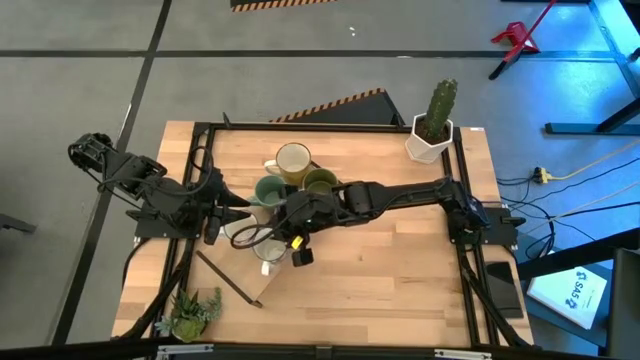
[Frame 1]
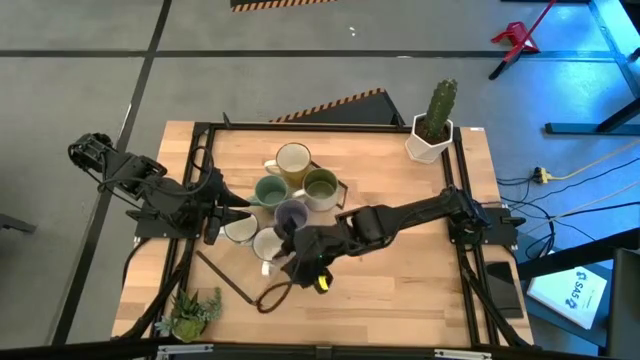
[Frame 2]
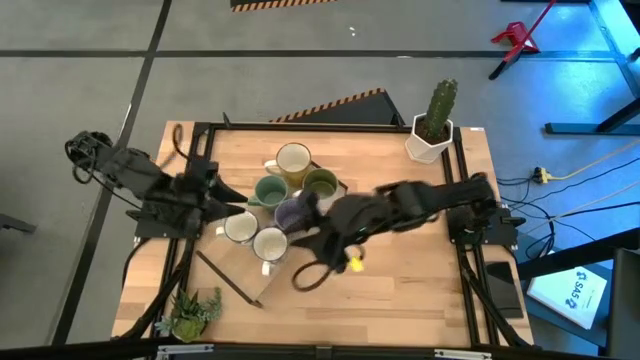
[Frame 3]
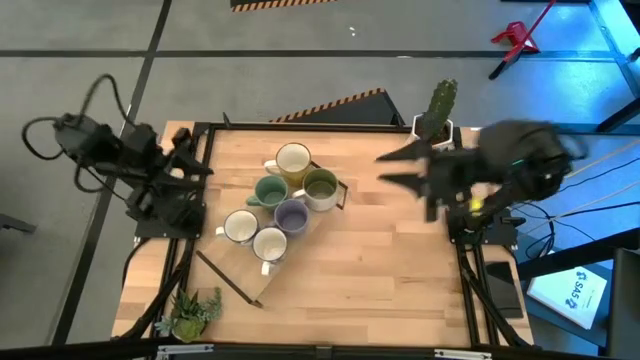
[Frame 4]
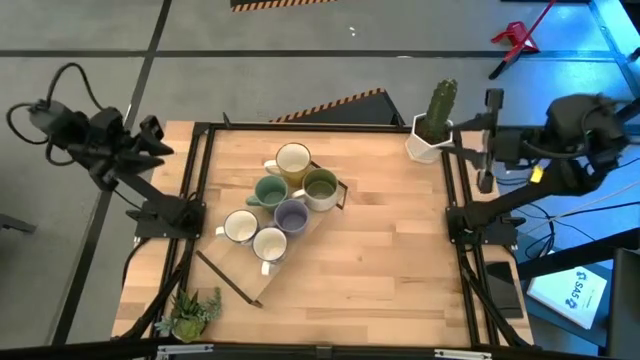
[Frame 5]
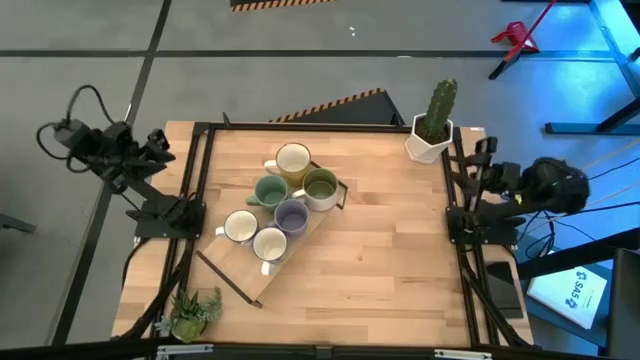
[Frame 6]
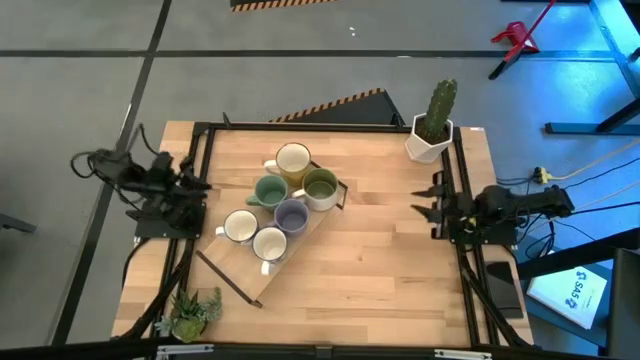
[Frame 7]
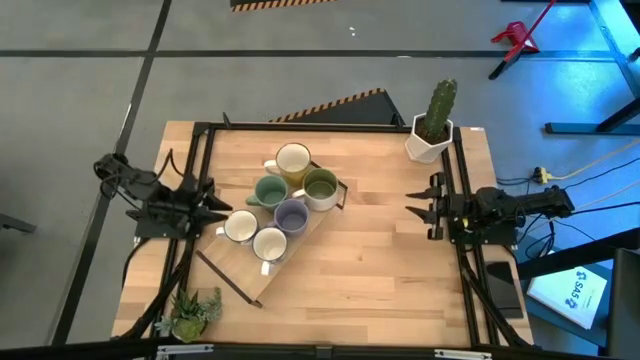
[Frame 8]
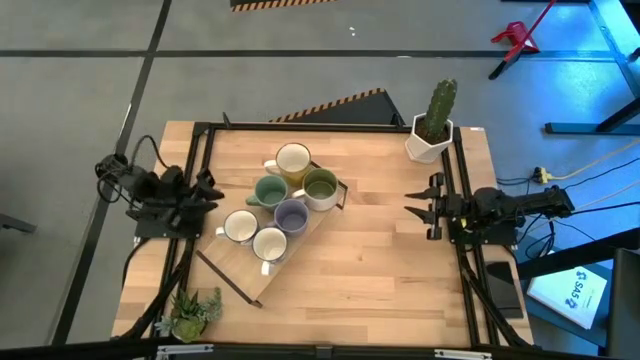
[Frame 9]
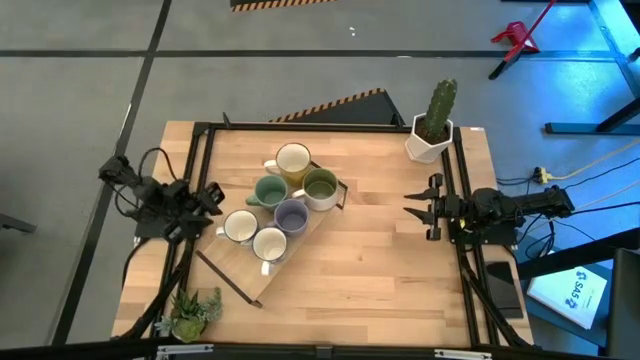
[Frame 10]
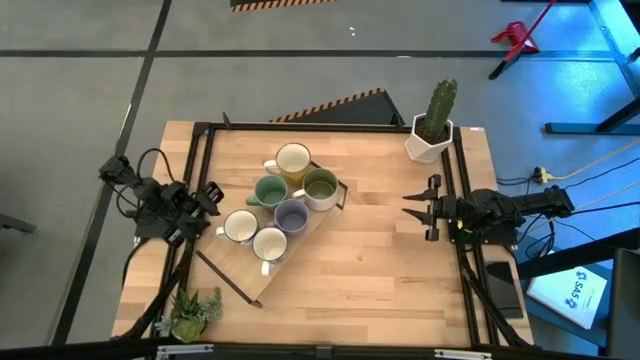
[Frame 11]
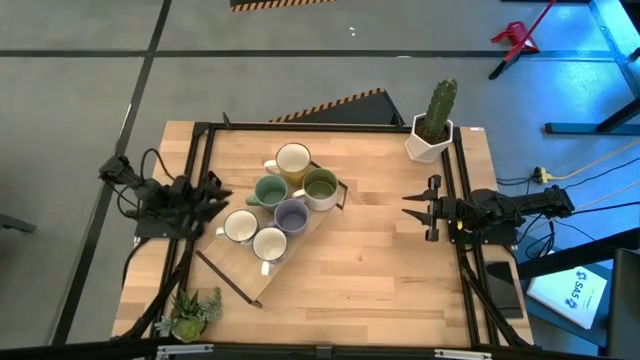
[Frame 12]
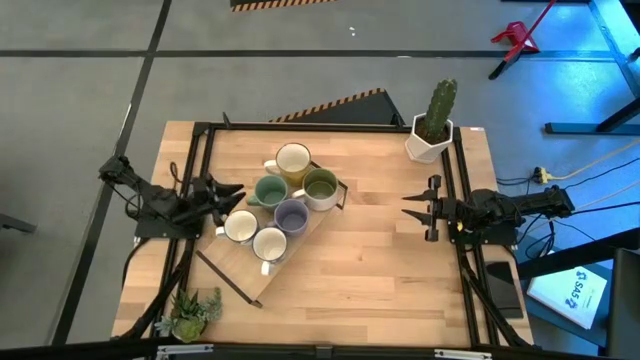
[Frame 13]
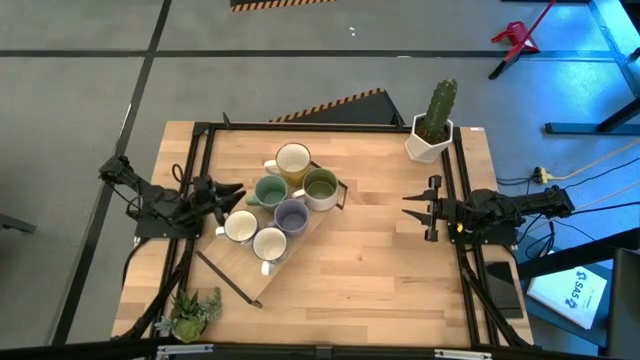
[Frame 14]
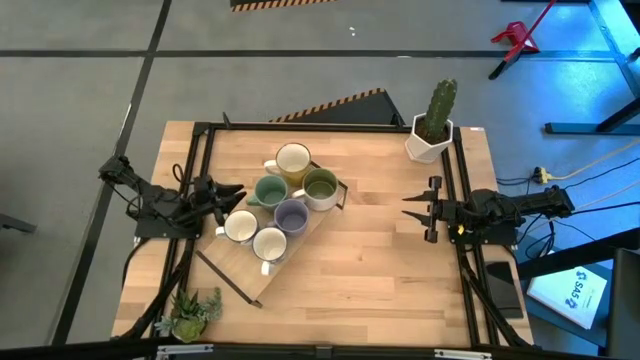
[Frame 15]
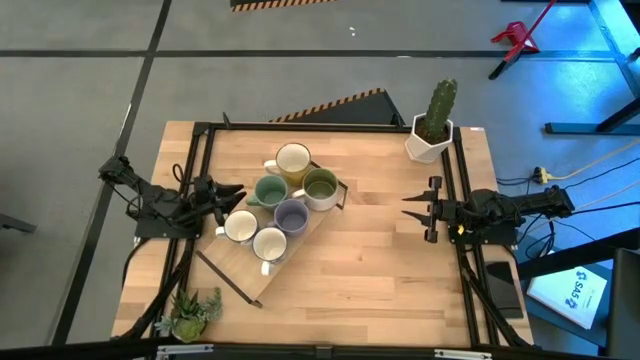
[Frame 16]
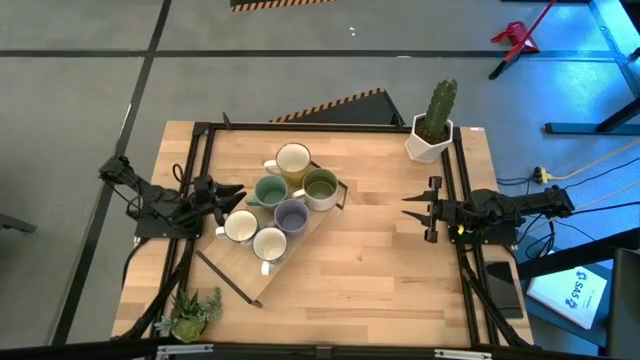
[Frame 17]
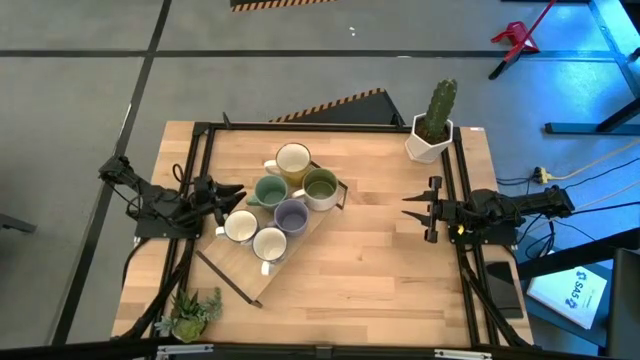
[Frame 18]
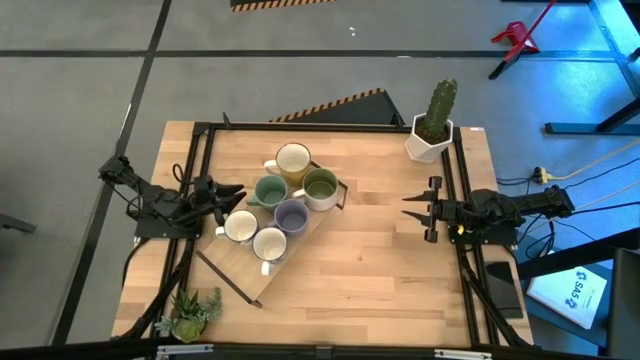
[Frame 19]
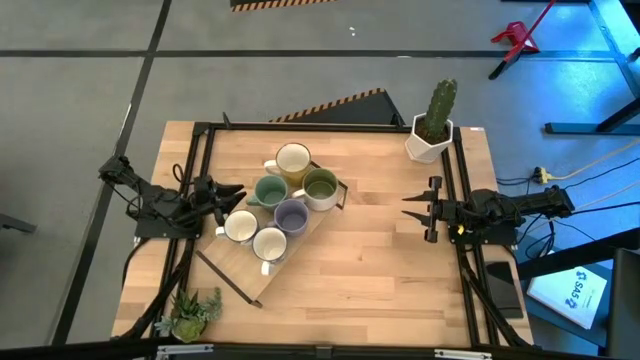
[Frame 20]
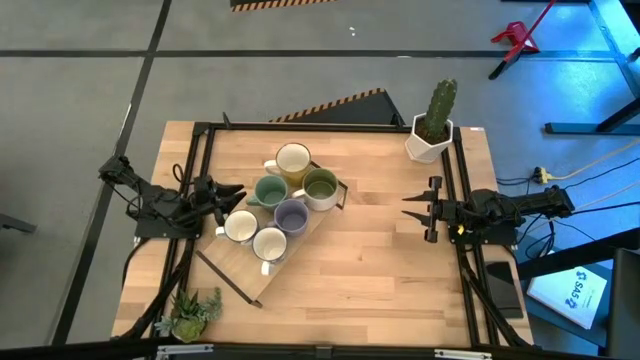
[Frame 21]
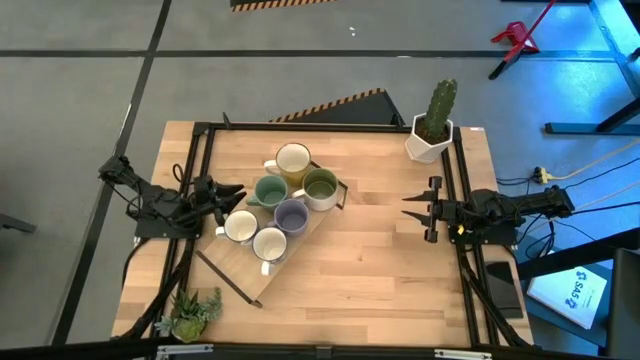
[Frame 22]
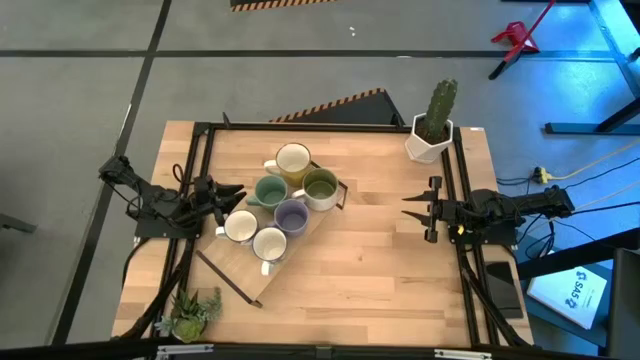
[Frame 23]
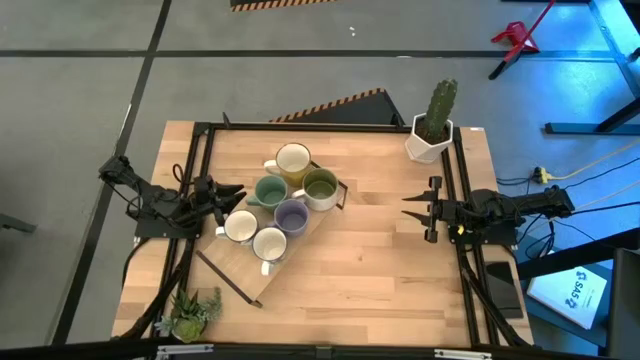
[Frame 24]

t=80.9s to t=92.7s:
Task: Place coffee mugs
Return to Home Position

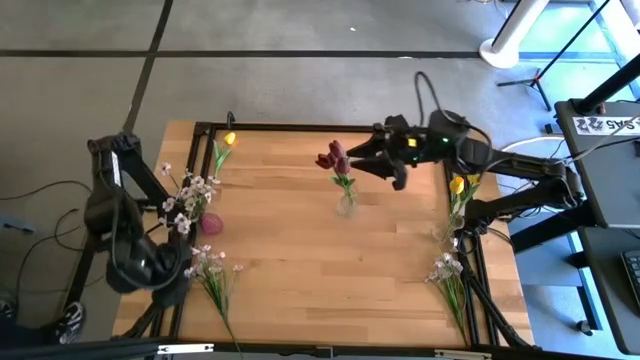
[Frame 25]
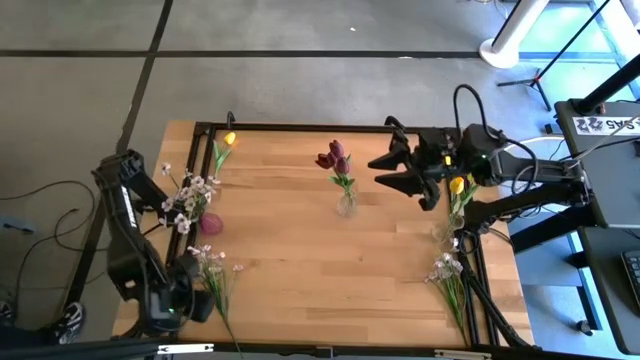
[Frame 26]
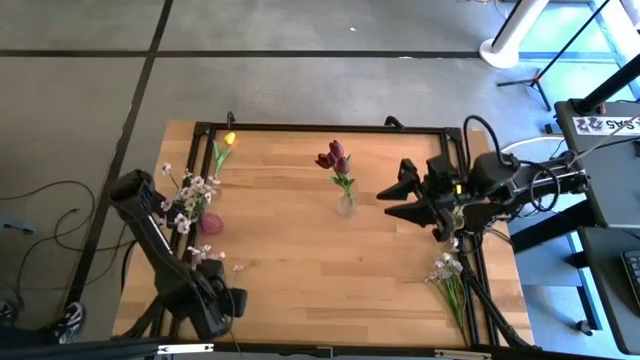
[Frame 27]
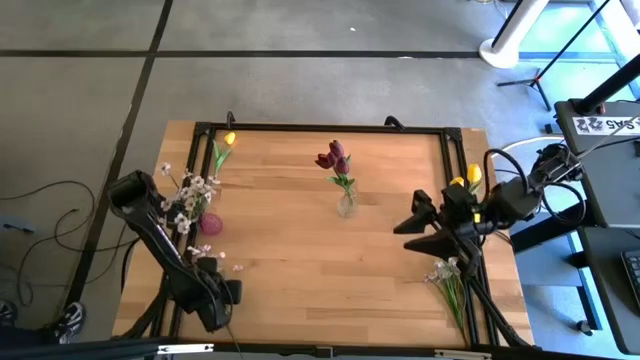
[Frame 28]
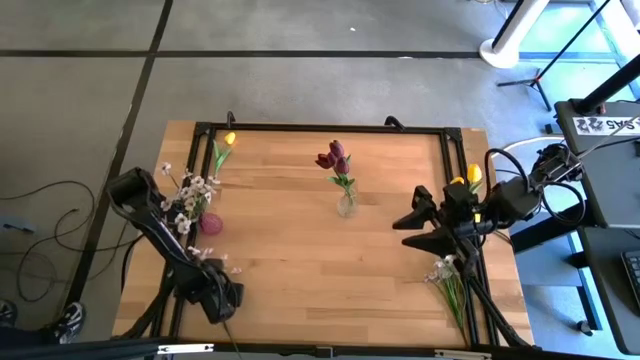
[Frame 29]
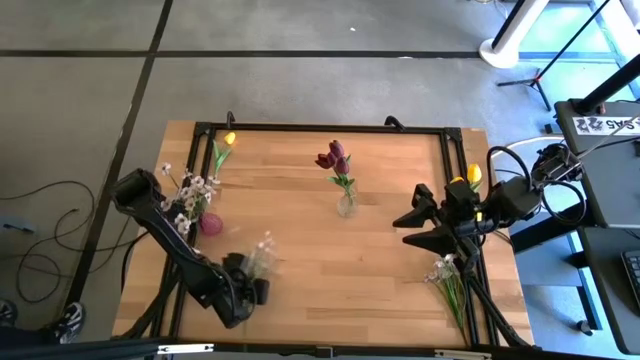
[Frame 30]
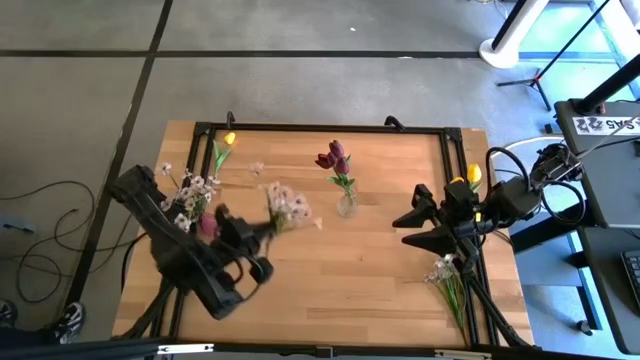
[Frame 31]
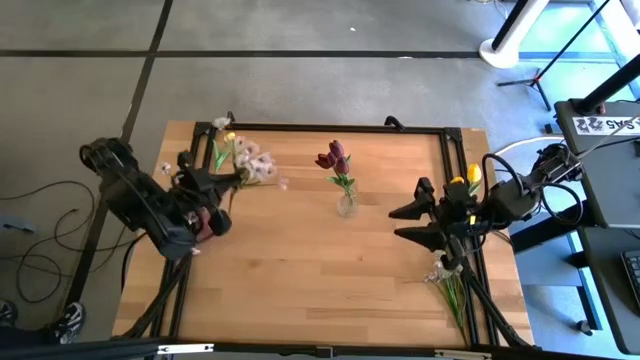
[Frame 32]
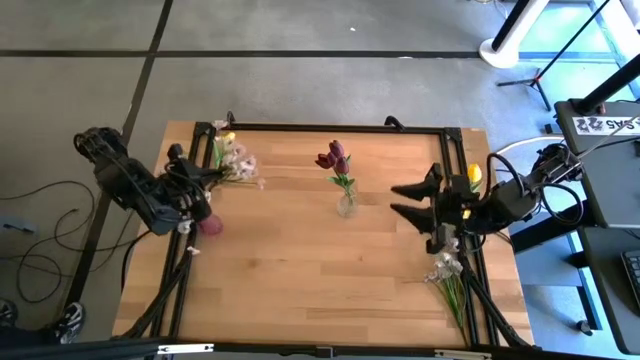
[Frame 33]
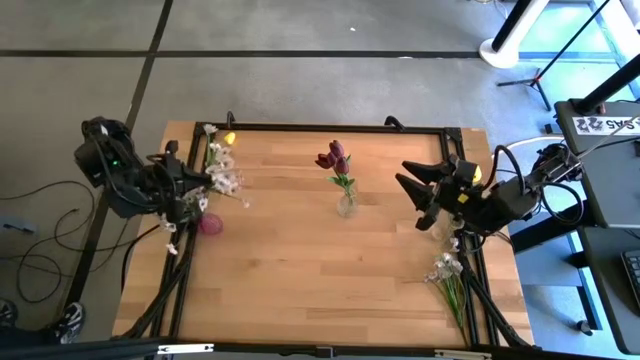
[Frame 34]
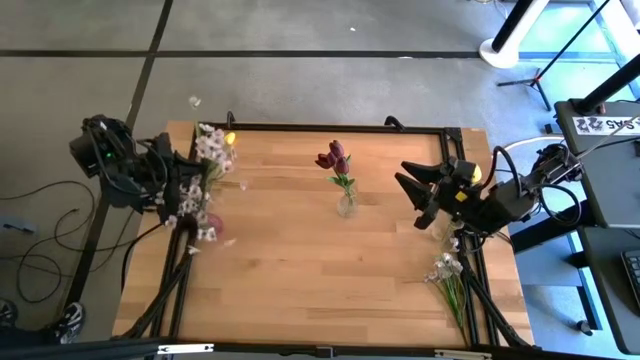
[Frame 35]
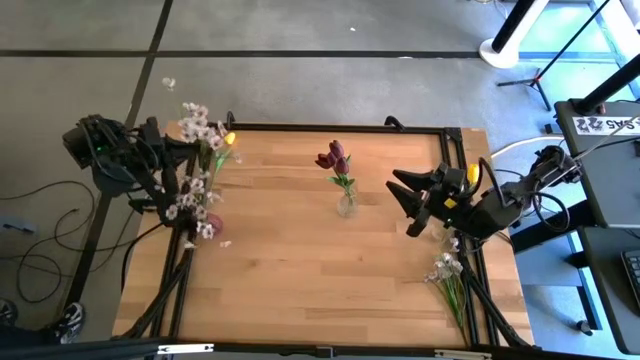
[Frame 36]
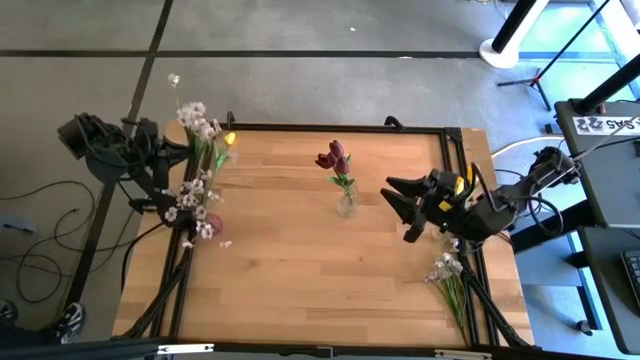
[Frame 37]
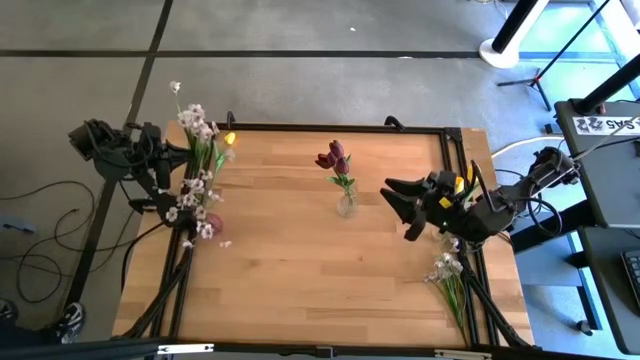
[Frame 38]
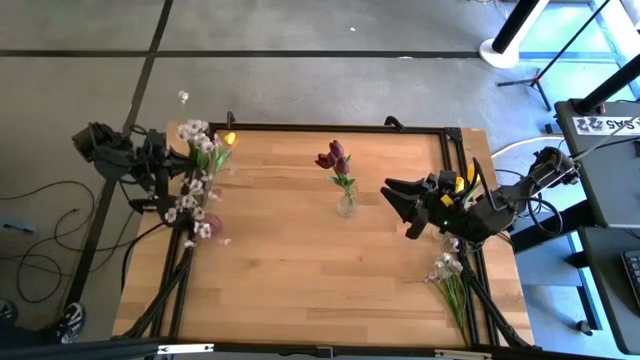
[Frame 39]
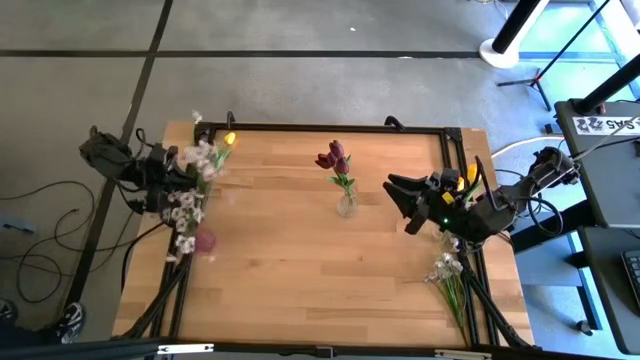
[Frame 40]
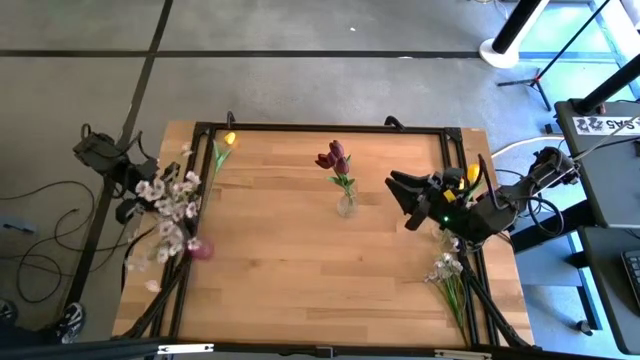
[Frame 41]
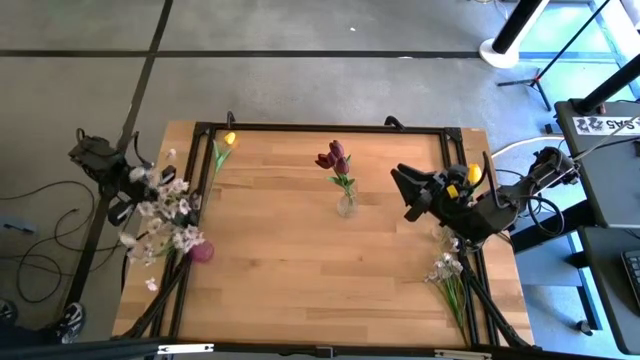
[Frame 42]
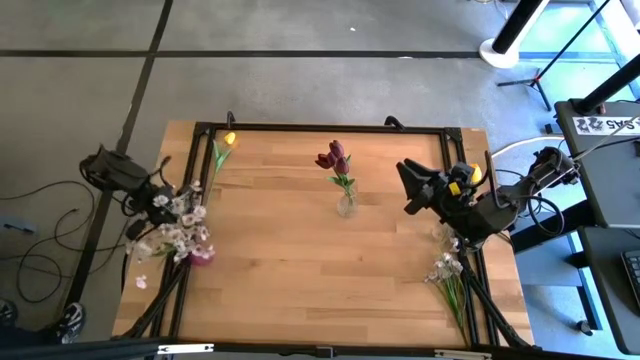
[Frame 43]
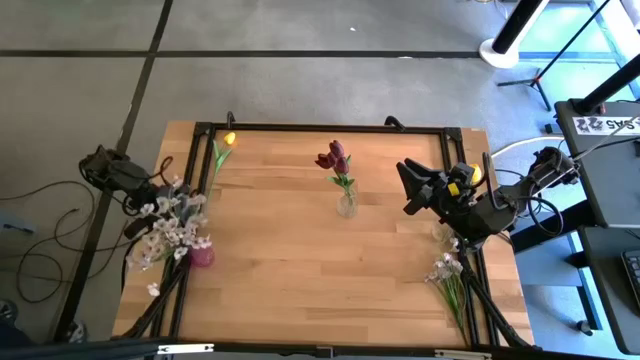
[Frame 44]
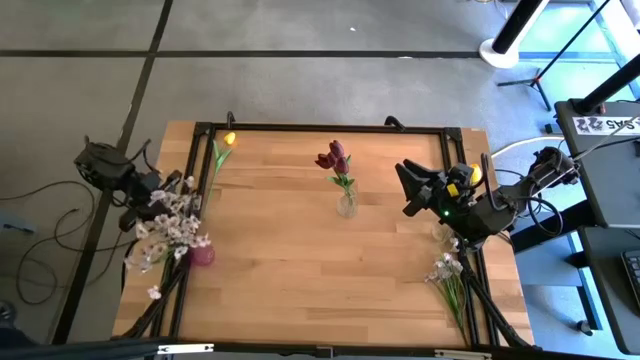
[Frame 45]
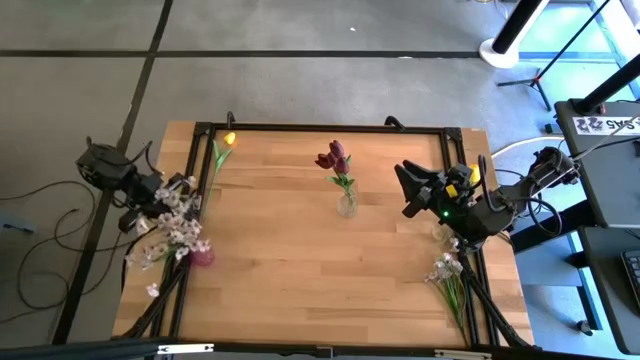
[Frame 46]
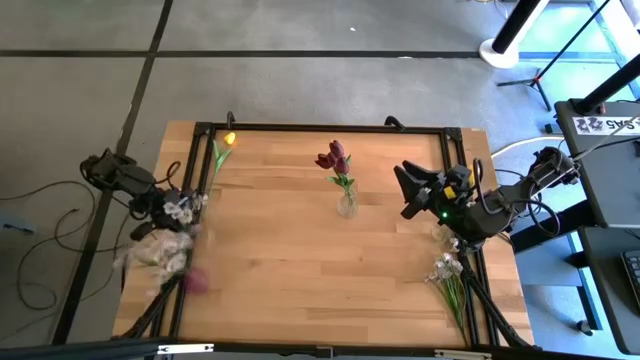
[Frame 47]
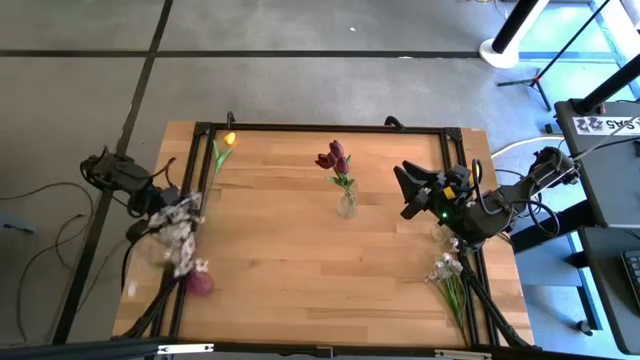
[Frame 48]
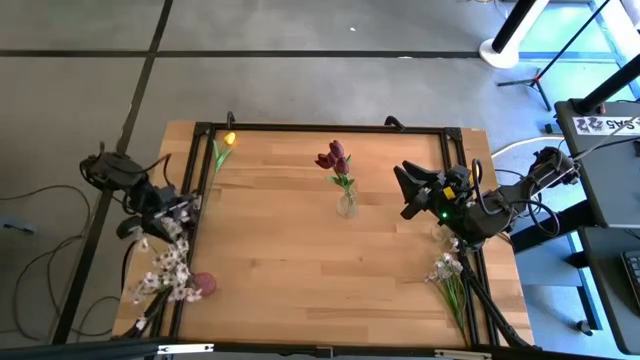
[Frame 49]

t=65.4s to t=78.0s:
Task: Sort flowers into vase by color
Put the left white flowers into the violet vase
